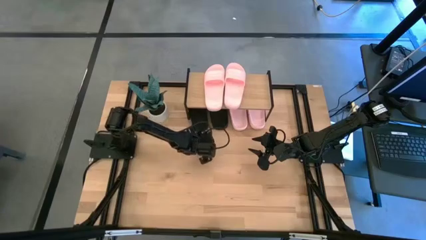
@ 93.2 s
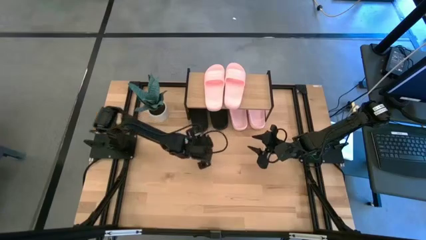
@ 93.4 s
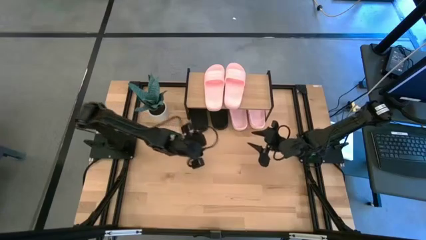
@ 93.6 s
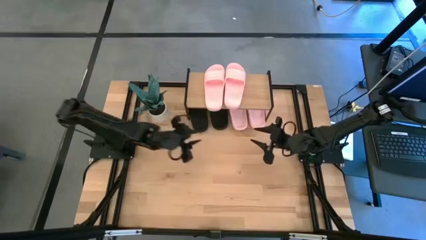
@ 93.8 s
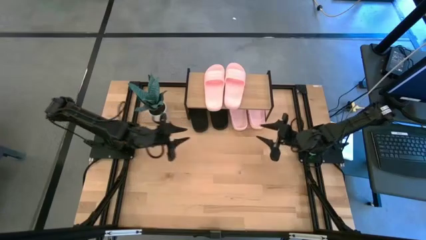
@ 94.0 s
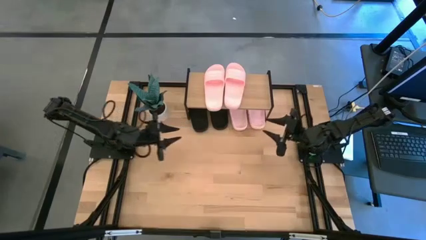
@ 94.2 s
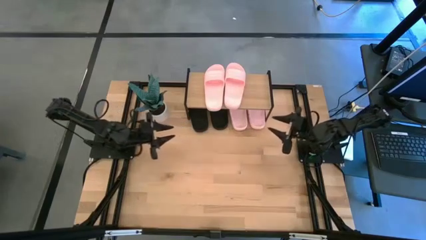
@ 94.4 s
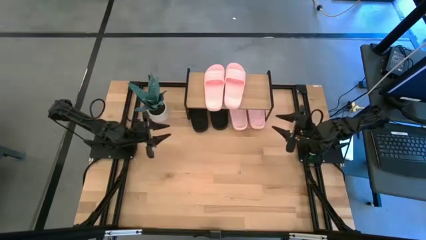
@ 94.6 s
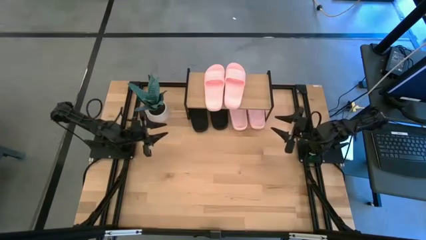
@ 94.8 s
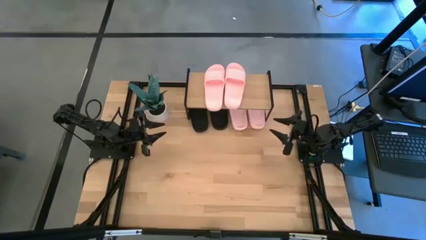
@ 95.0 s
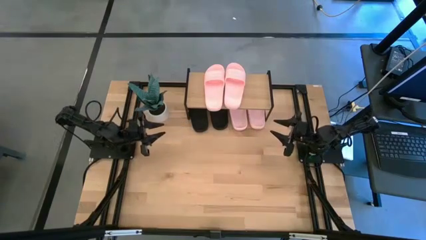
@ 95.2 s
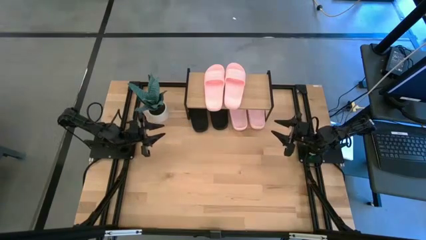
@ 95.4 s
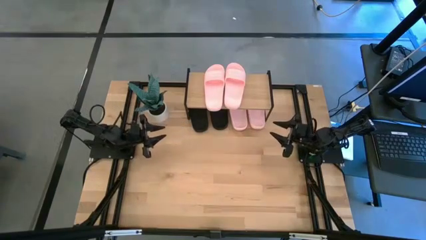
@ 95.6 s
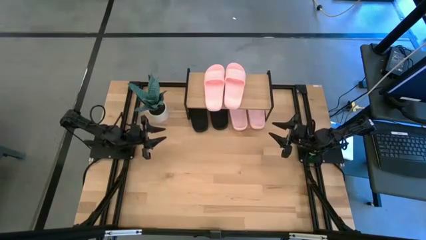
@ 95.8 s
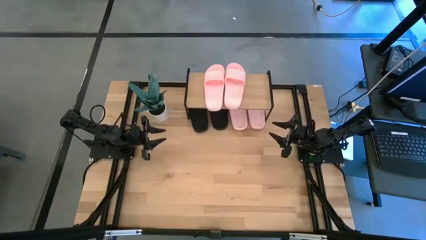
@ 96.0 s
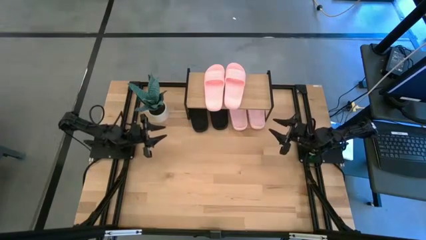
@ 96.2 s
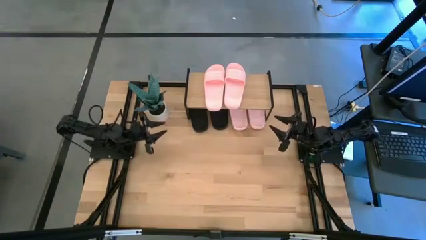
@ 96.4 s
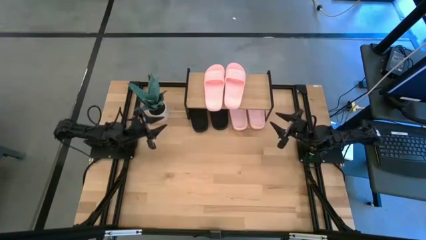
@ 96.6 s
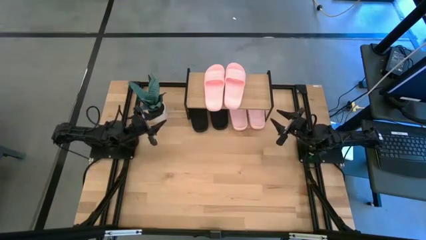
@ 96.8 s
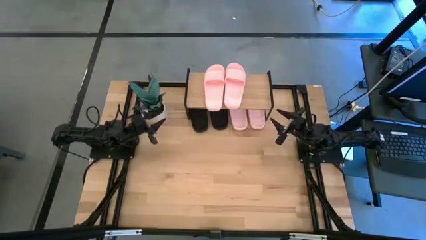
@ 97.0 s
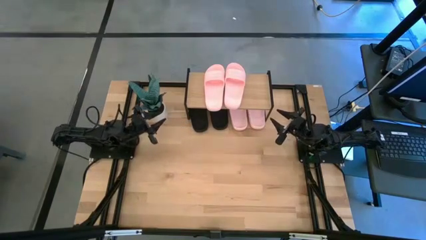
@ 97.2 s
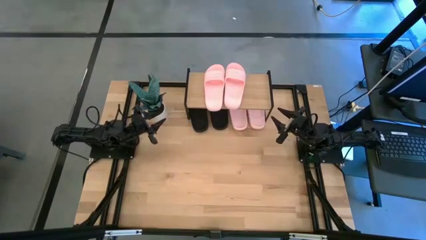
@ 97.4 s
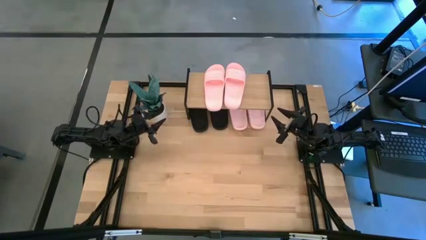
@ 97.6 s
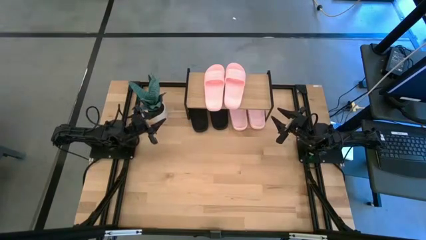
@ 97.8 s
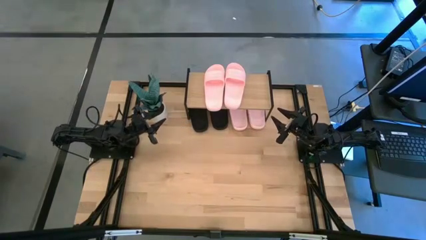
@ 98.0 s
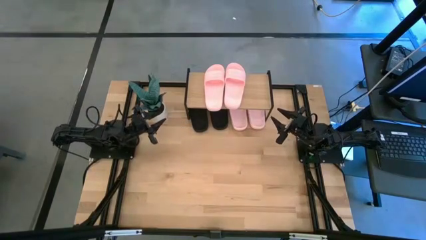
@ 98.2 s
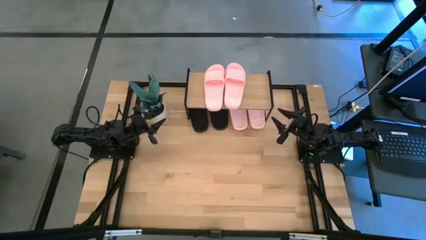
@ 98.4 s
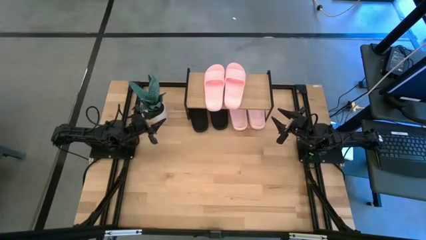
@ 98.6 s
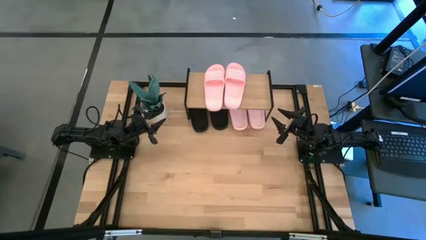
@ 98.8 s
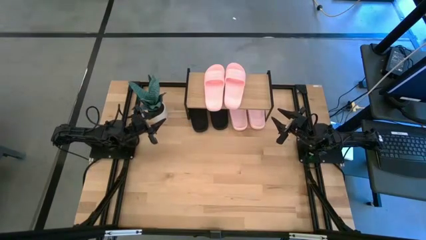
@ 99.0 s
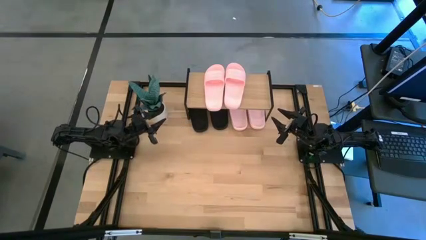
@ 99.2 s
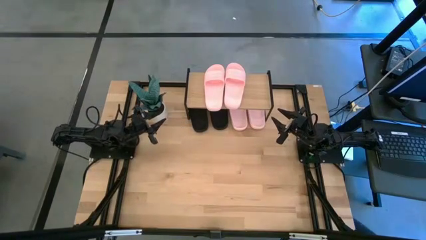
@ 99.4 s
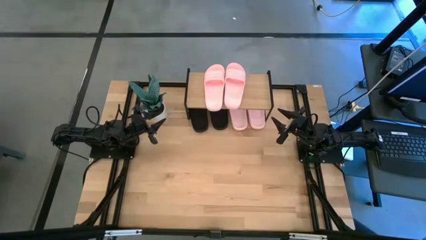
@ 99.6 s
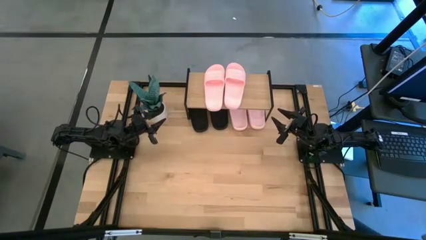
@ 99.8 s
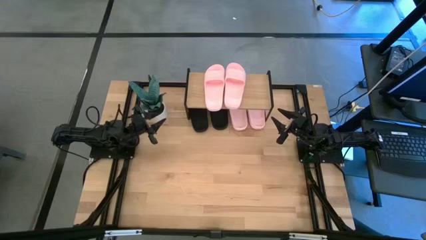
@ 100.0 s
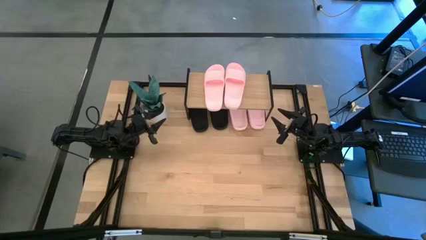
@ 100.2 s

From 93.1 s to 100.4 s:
Task: Pick and place slides into the shelf
Return to Home Position

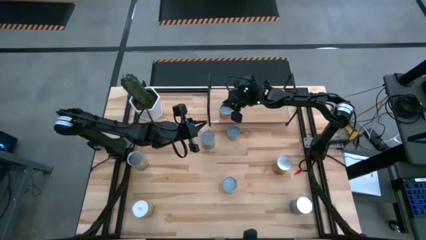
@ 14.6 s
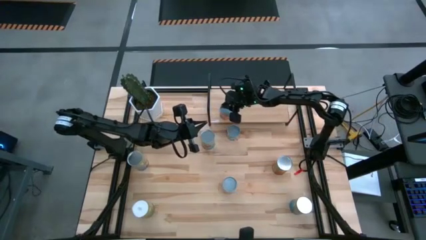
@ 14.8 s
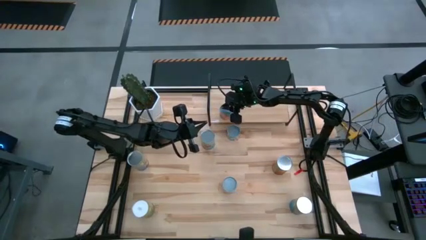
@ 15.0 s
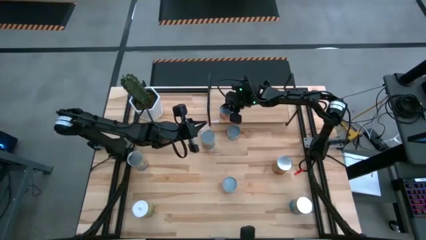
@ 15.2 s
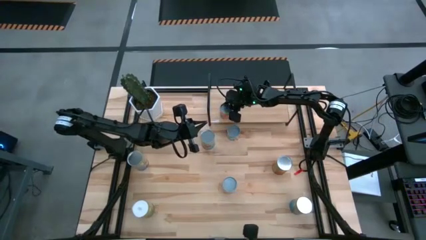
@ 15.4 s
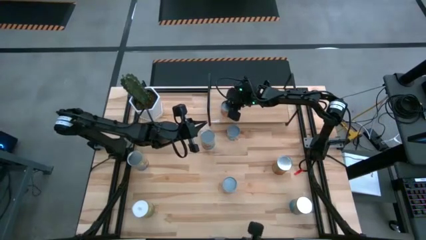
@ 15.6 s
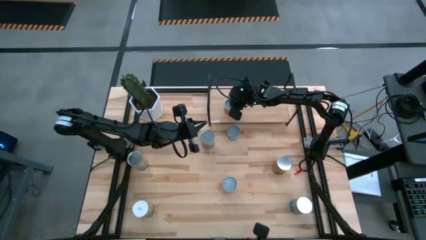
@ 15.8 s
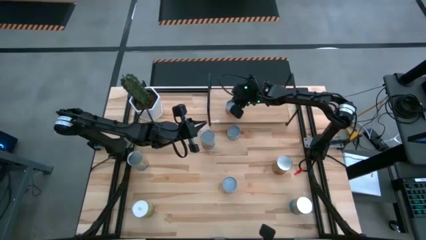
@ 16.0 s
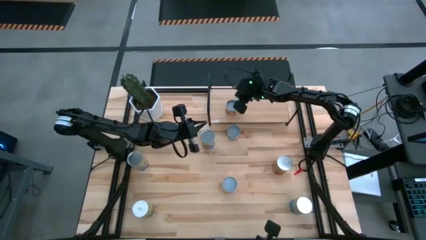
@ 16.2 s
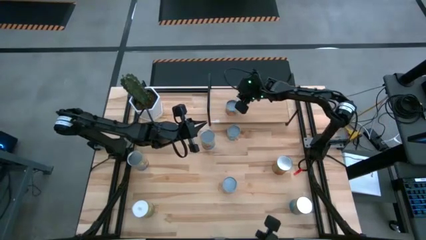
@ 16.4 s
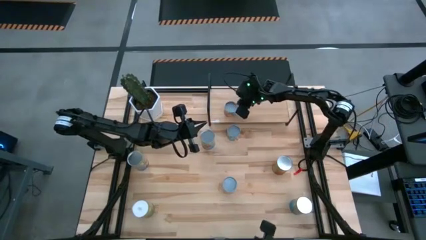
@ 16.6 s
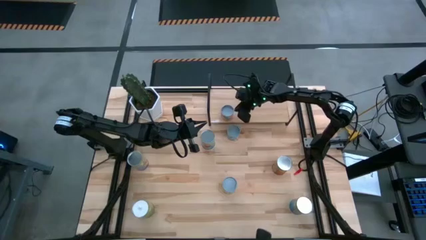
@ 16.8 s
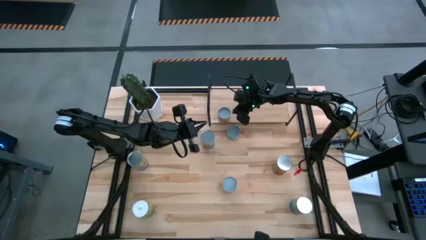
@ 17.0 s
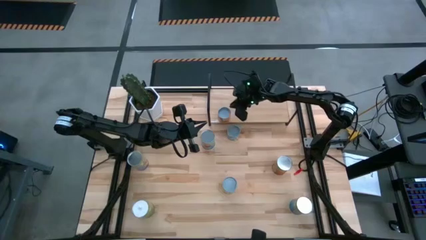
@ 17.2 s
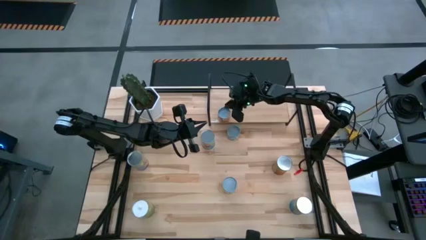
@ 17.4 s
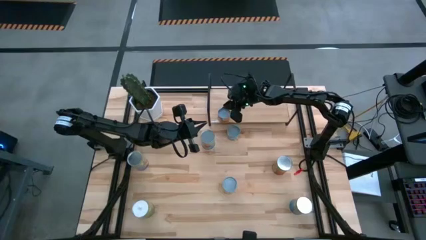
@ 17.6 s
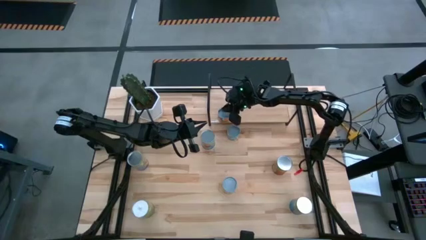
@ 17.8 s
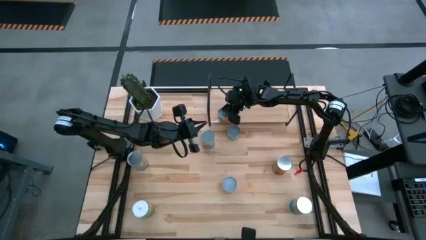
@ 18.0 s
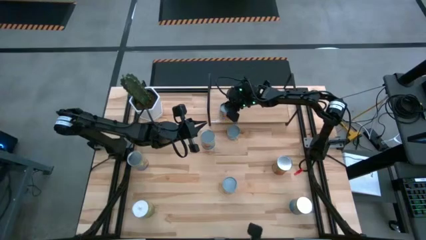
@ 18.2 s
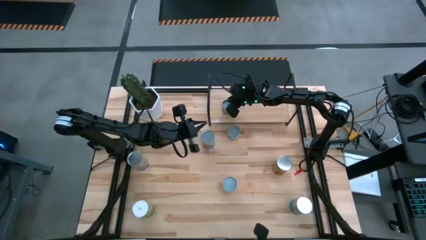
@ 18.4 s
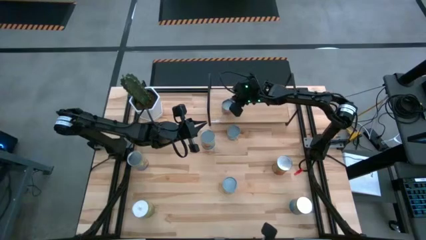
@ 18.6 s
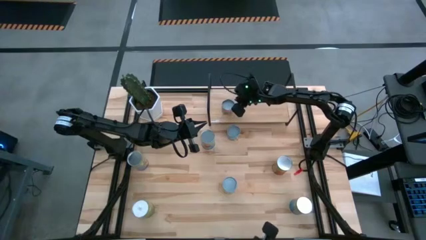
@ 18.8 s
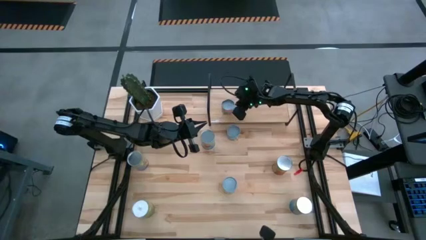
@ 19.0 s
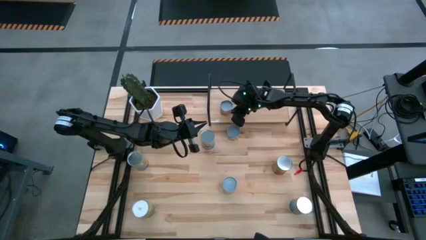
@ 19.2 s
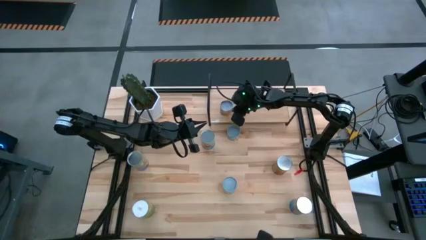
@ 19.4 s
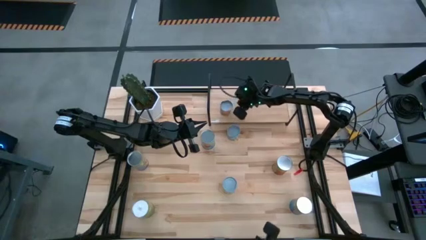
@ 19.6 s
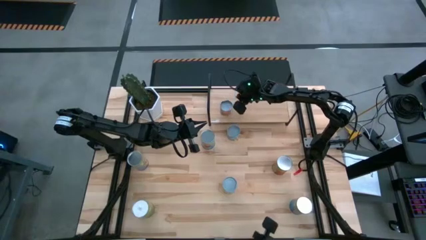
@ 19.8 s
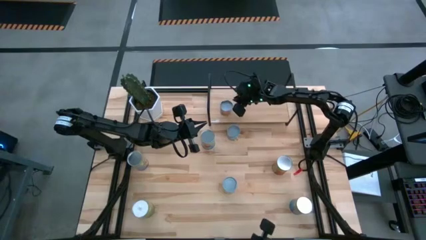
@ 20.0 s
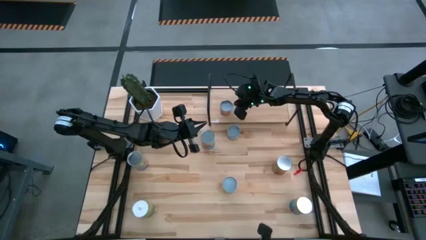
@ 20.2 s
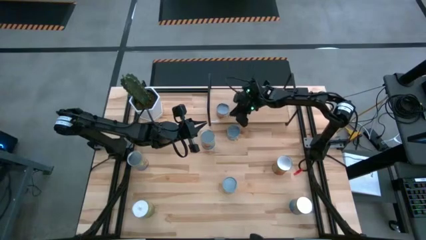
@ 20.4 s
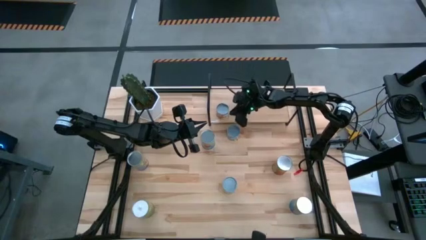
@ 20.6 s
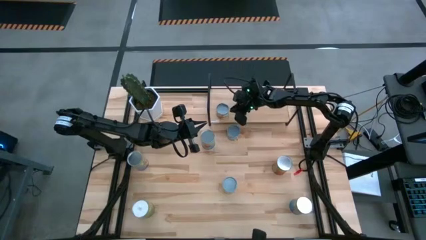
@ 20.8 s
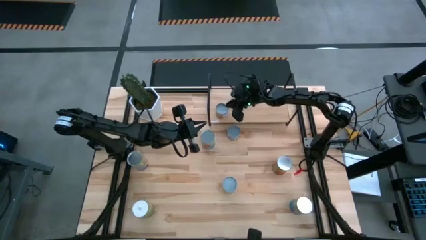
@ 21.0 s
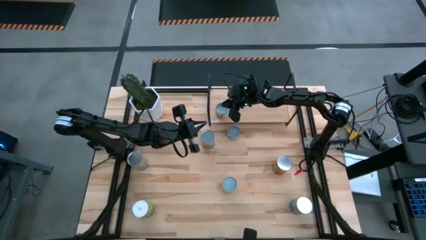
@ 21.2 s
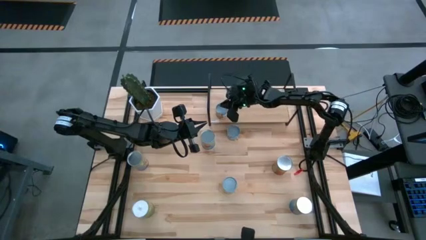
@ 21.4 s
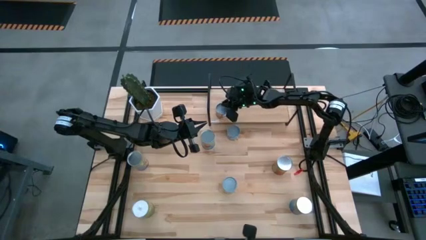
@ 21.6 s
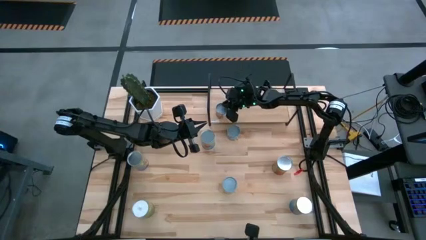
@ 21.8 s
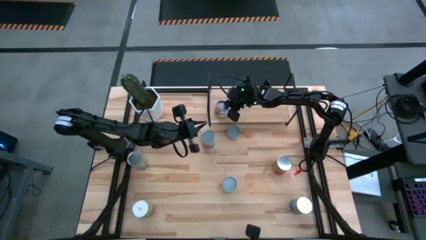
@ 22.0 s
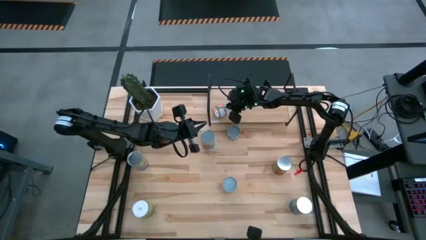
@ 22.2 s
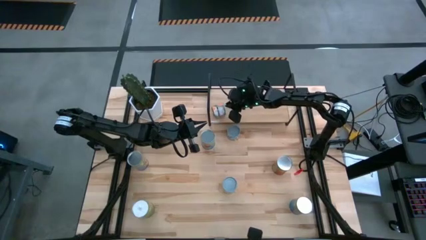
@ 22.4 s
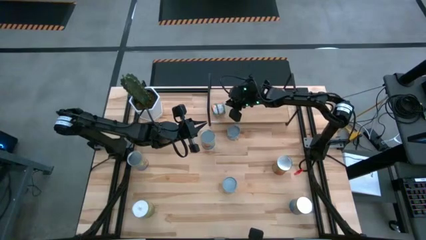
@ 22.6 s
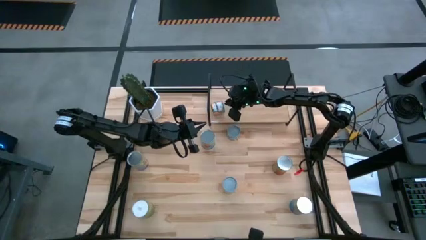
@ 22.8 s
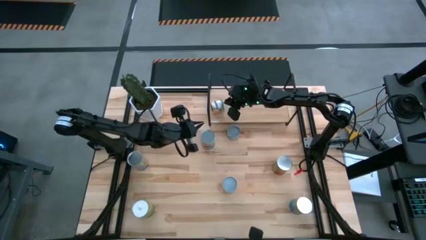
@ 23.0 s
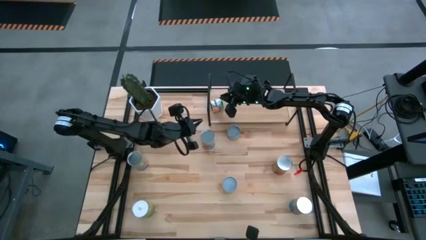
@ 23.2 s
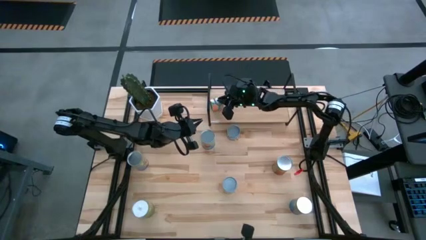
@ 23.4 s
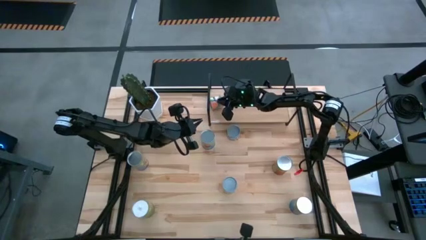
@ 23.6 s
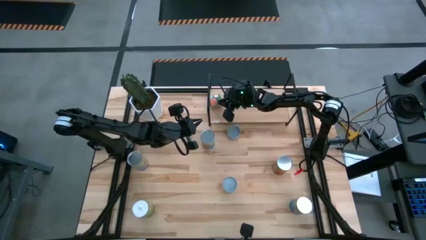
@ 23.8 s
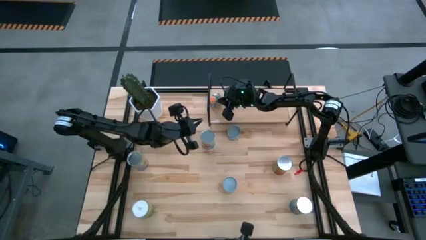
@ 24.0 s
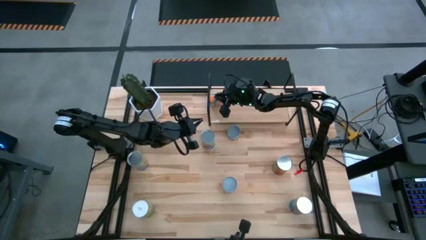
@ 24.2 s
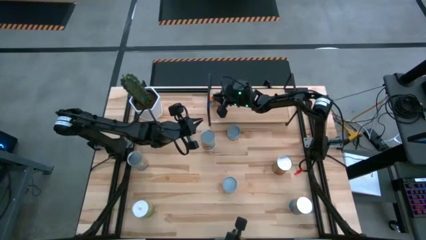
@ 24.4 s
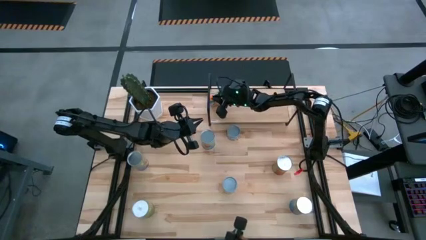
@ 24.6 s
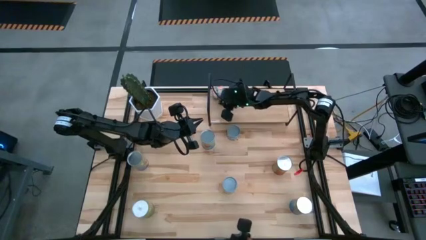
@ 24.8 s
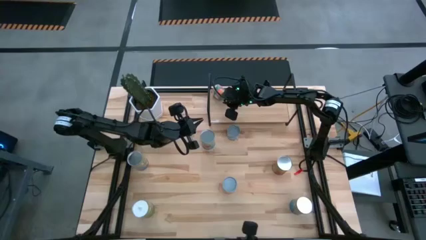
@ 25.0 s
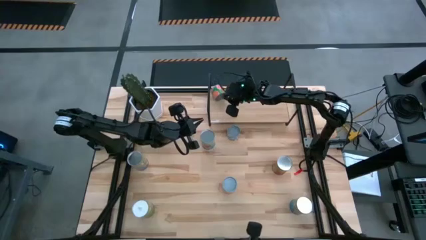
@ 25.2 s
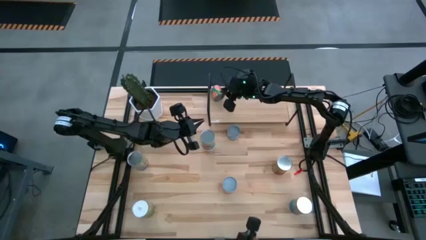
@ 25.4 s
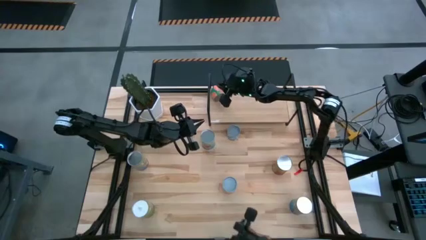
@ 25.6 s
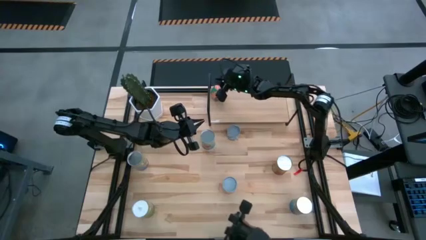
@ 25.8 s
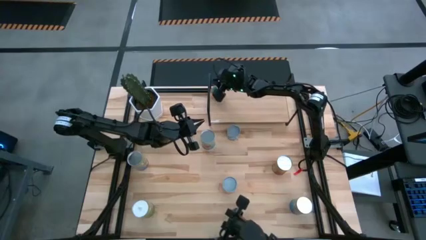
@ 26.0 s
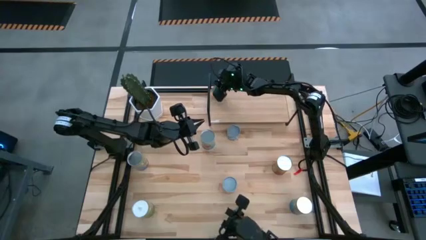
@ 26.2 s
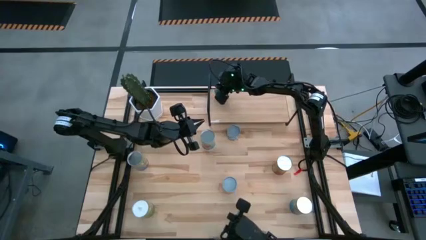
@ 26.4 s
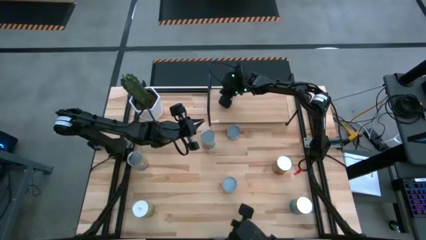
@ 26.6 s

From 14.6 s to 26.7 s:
Task: Pick and place cans onto a shelf
Put the small canned oranges on the shelf
